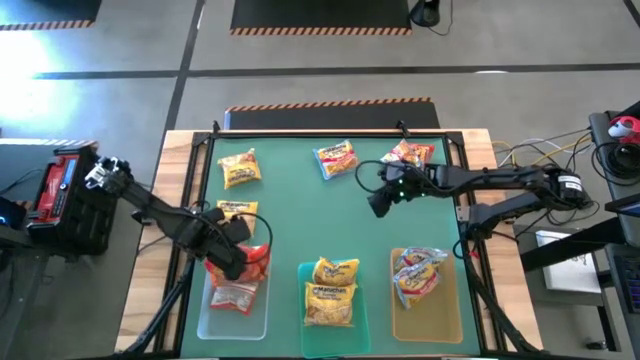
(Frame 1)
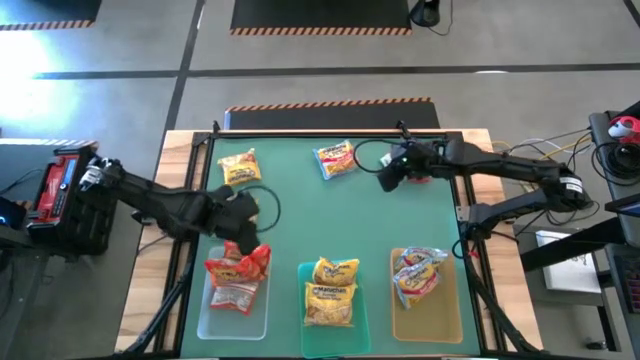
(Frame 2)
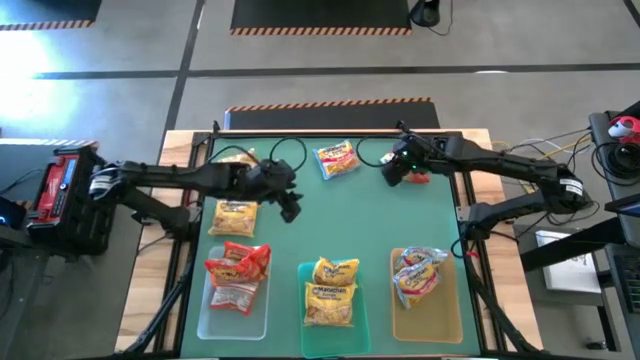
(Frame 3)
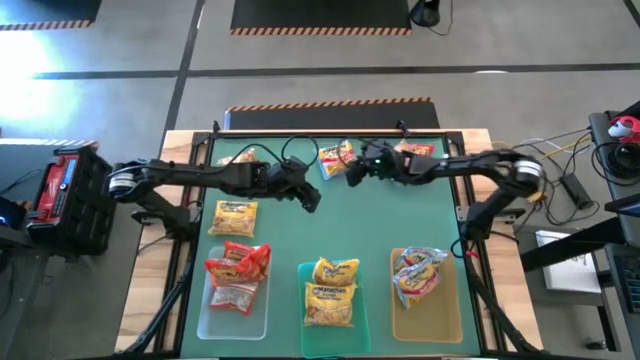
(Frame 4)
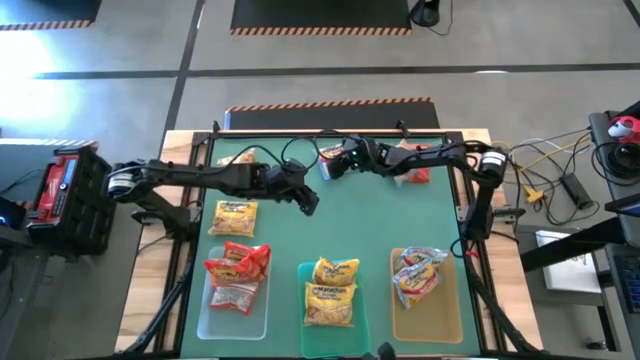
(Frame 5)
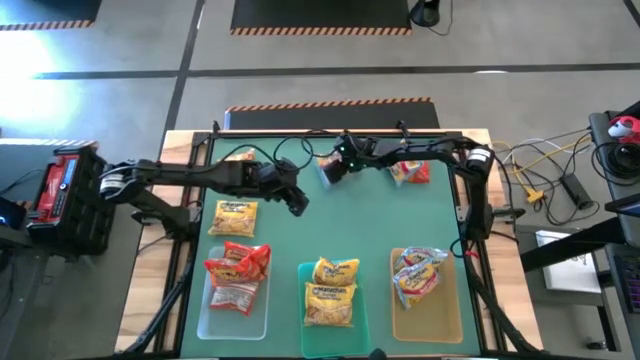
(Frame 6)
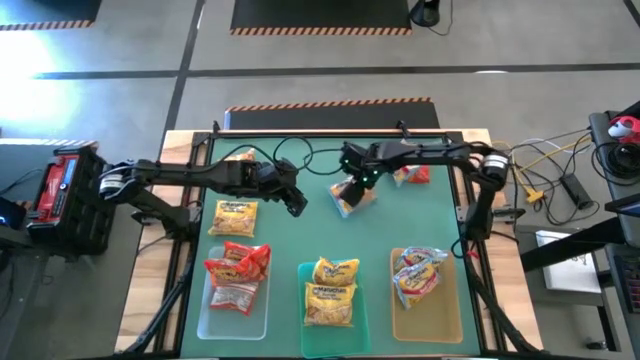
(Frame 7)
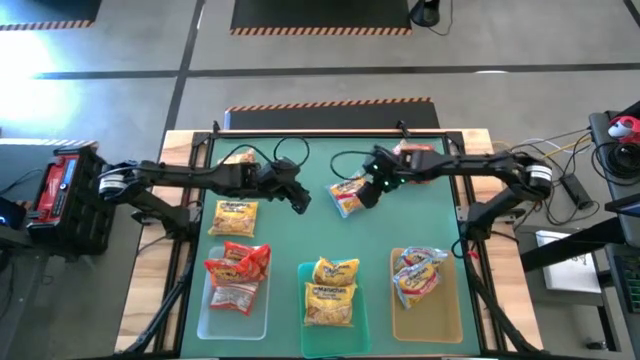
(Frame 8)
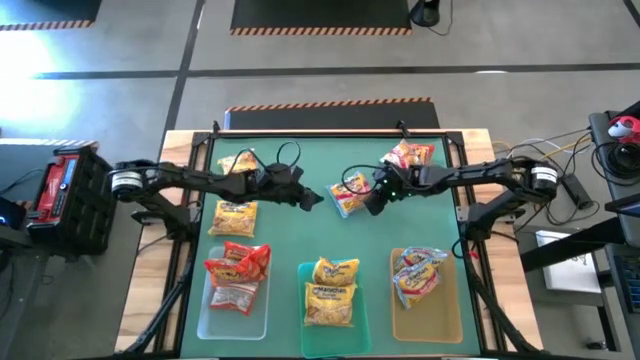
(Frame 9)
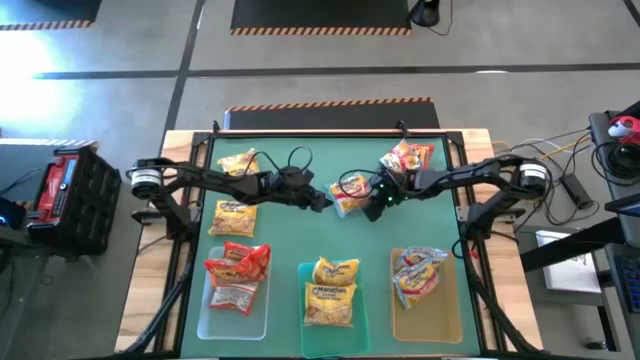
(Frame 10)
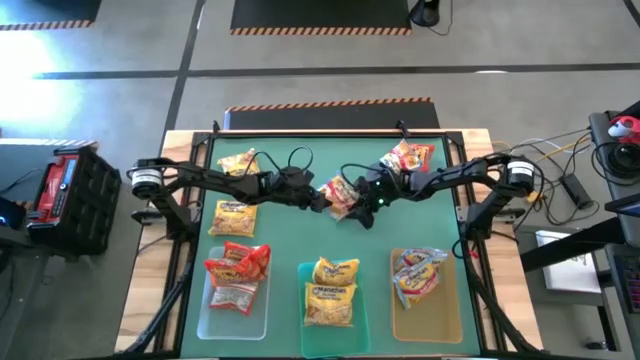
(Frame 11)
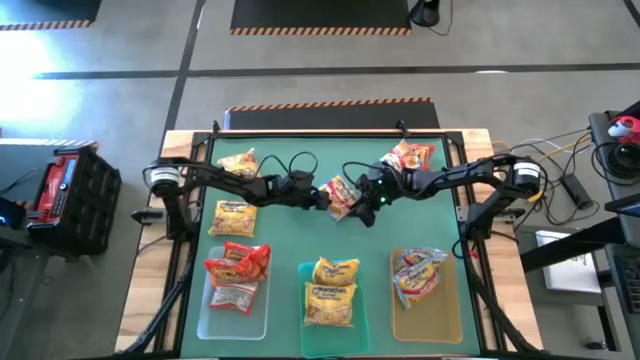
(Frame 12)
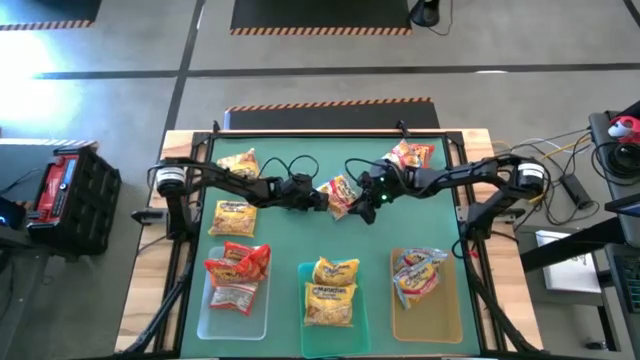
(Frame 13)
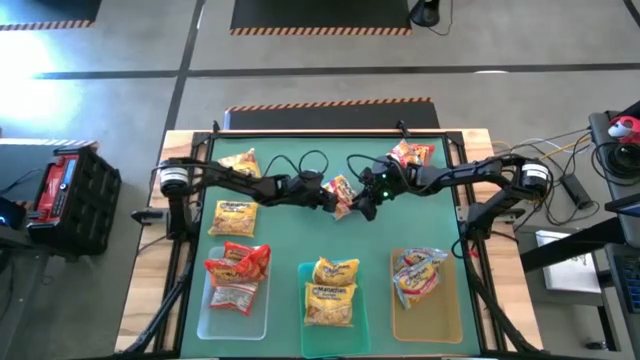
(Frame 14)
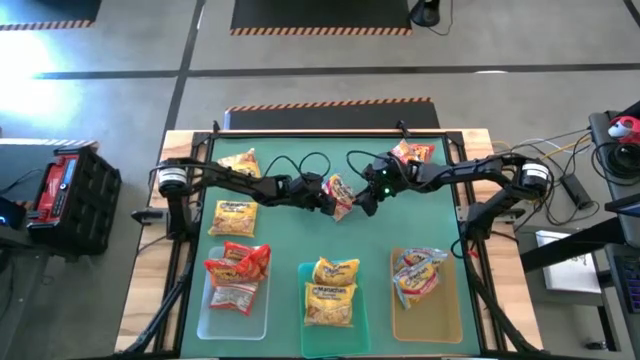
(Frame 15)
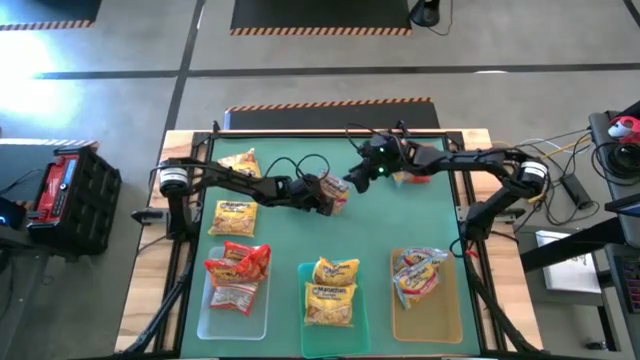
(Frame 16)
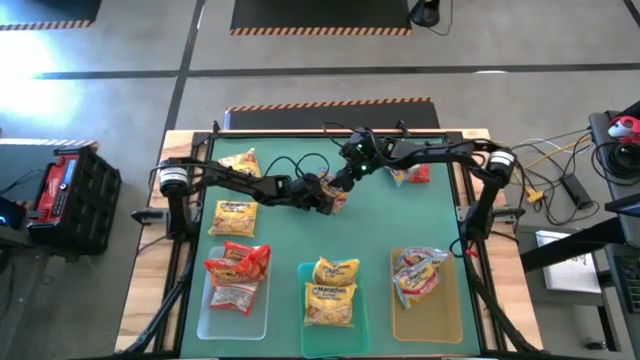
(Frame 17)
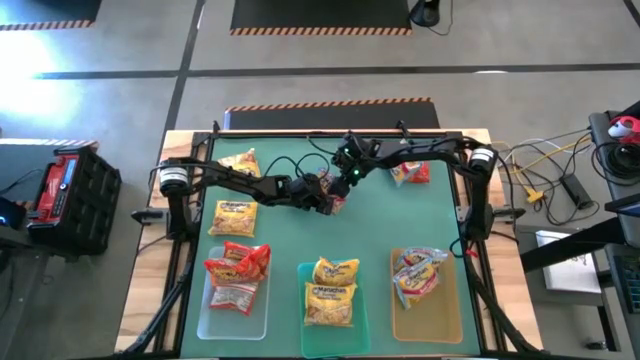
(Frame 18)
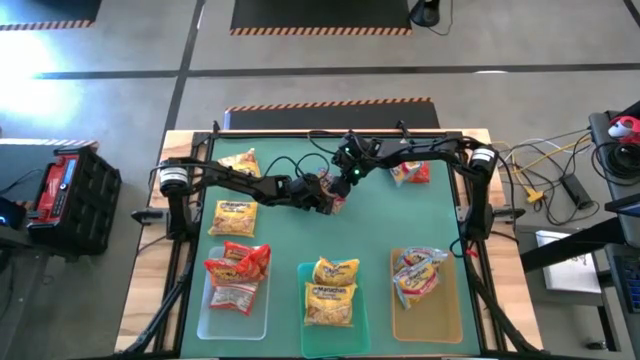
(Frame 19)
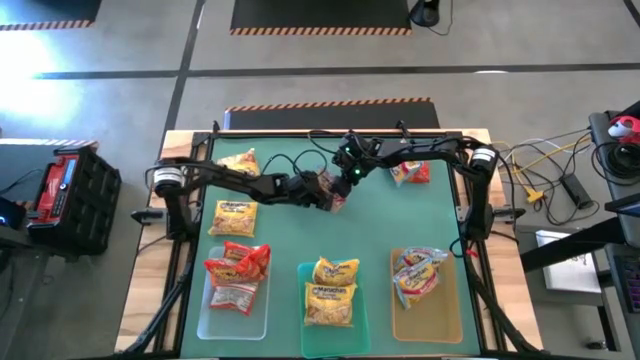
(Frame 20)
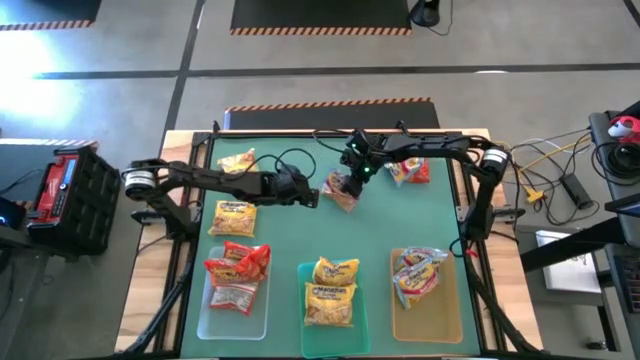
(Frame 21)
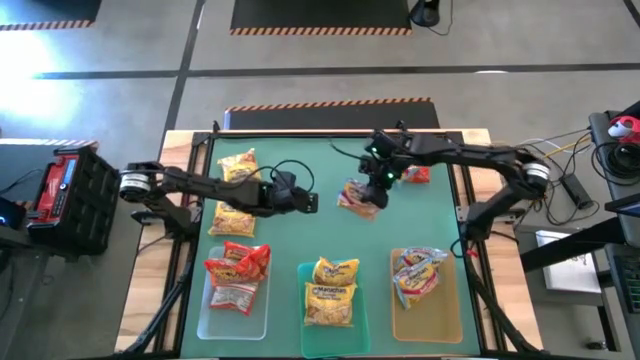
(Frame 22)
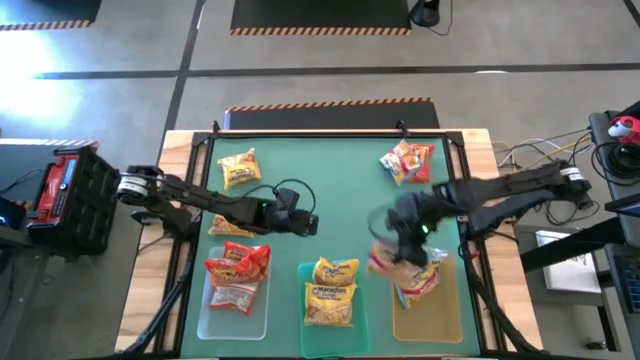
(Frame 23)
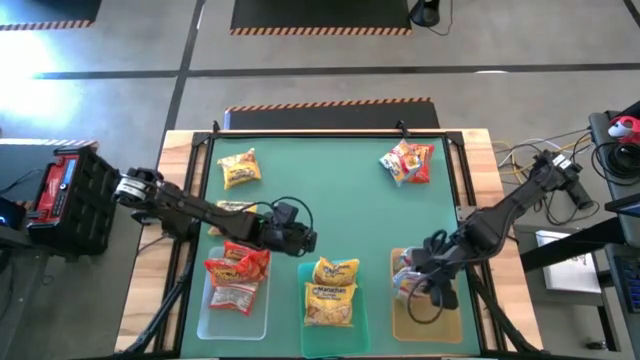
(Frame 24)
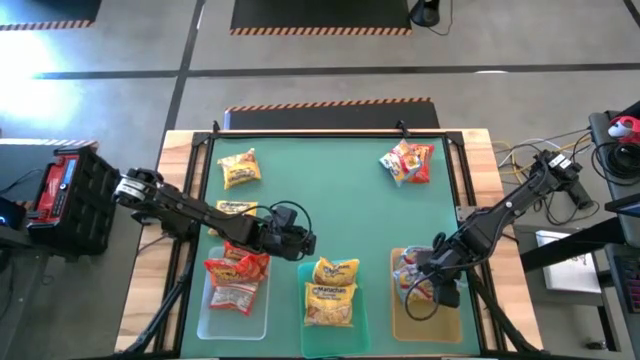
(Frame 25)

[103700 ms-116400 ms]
Task: Sort Maruchan noodles
Put the blue noodle pack into the yellow bin

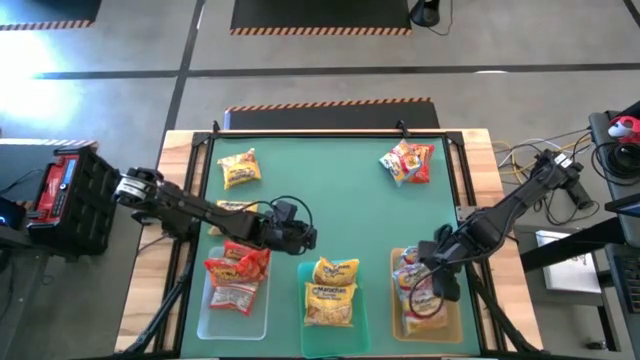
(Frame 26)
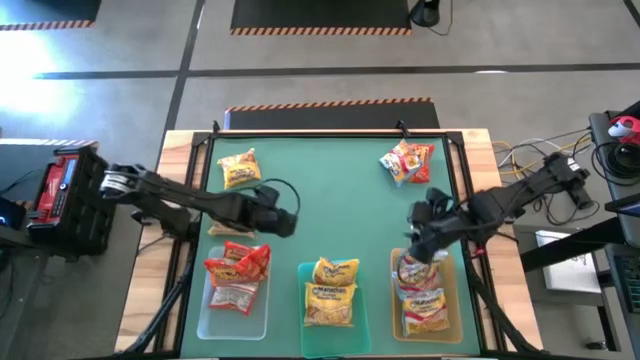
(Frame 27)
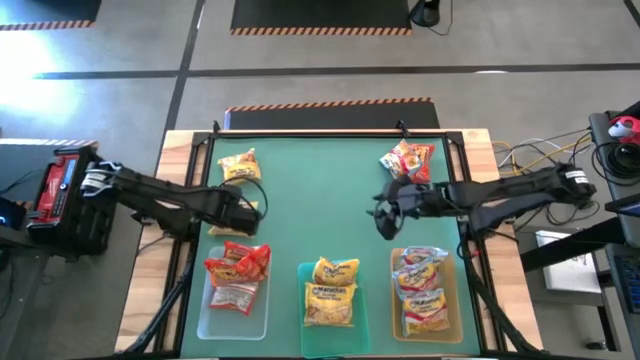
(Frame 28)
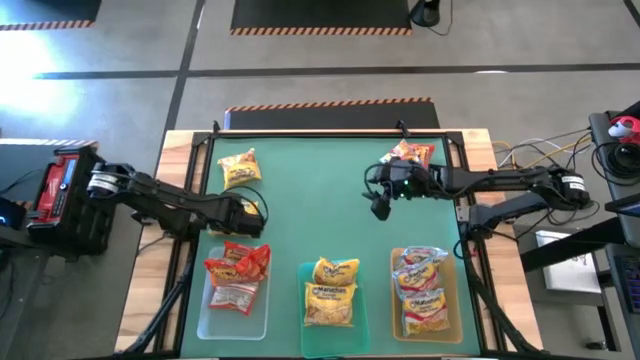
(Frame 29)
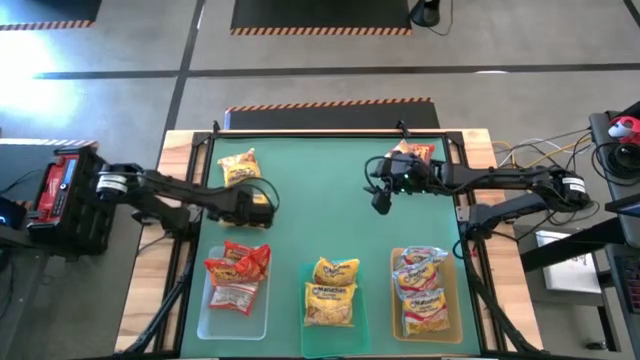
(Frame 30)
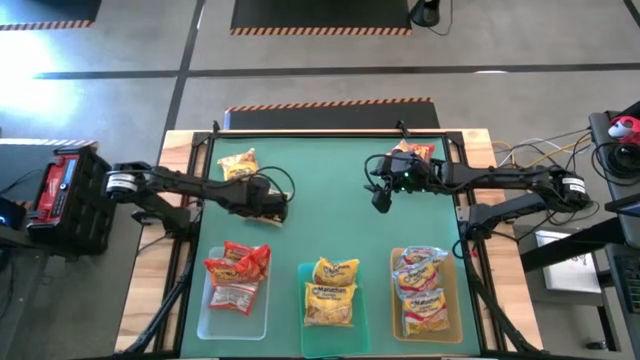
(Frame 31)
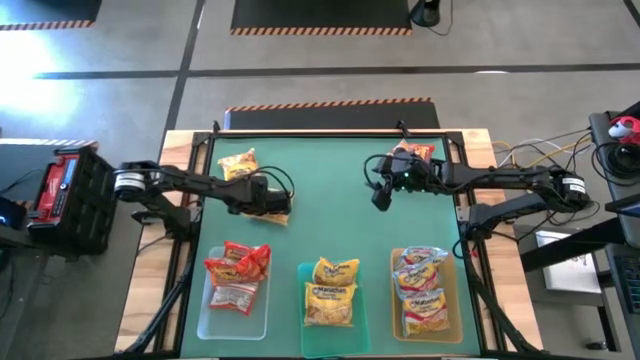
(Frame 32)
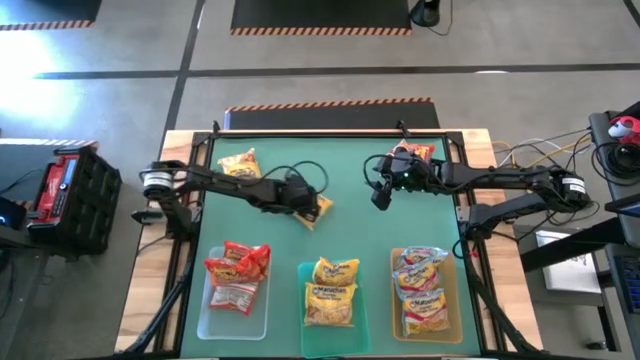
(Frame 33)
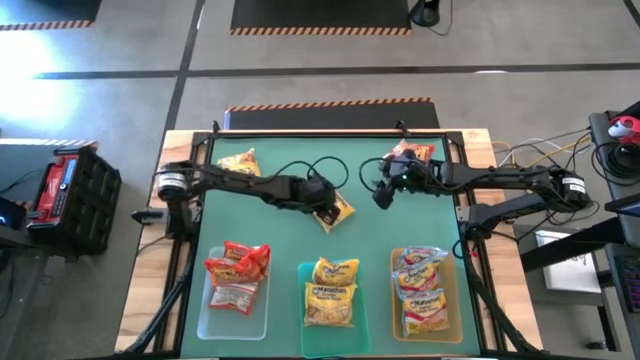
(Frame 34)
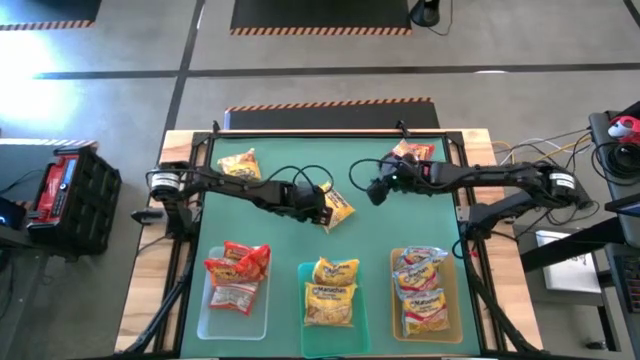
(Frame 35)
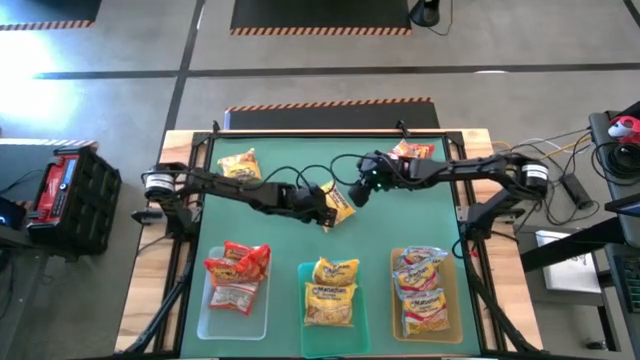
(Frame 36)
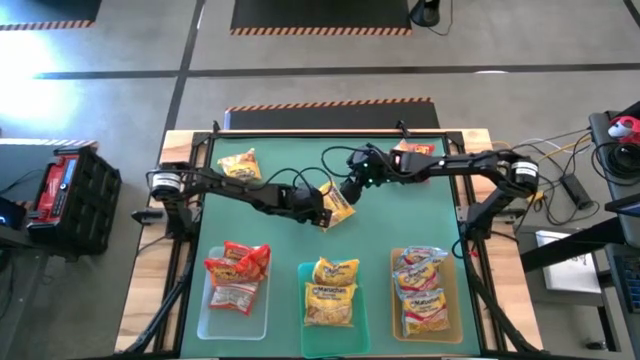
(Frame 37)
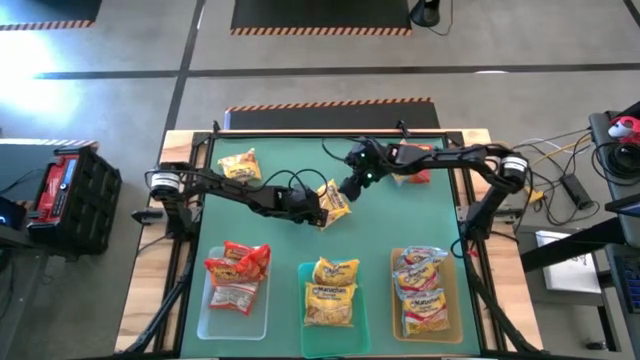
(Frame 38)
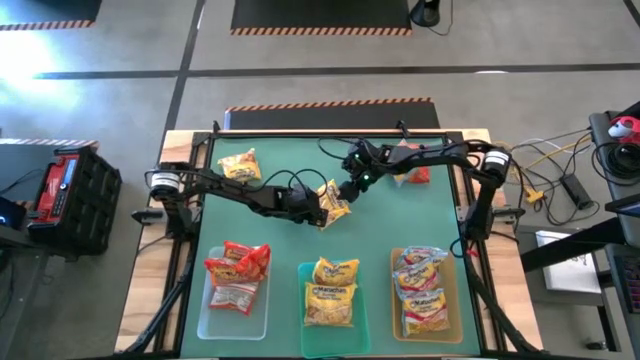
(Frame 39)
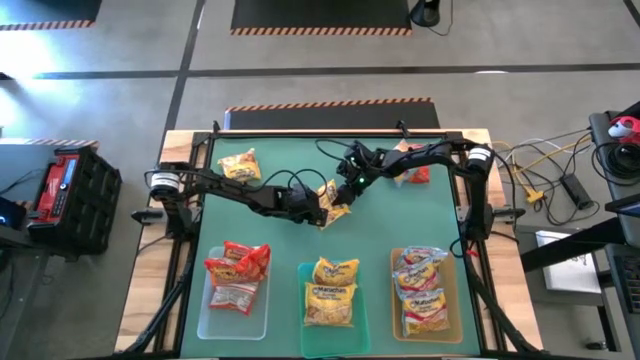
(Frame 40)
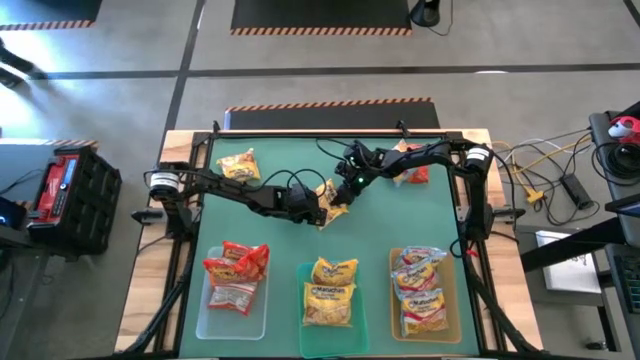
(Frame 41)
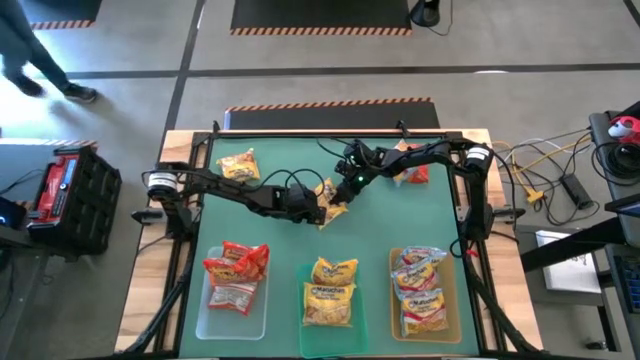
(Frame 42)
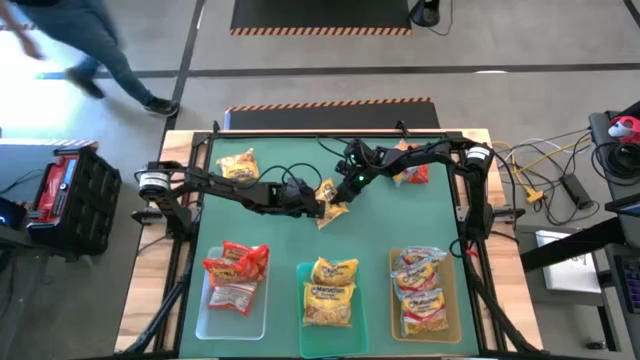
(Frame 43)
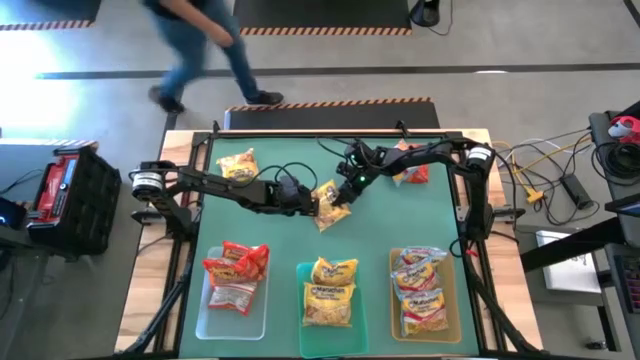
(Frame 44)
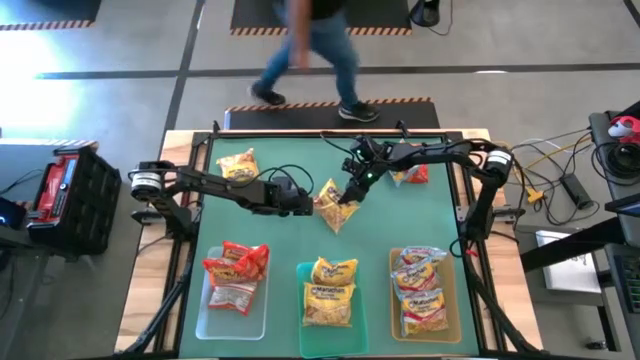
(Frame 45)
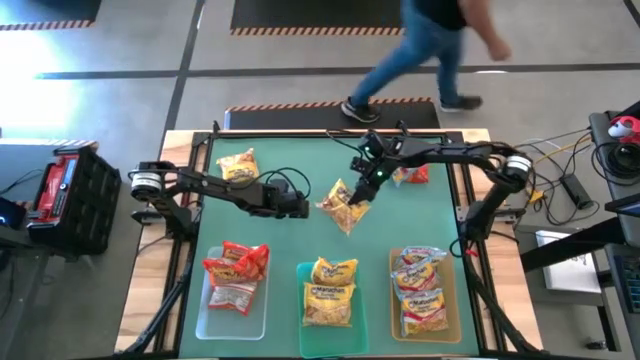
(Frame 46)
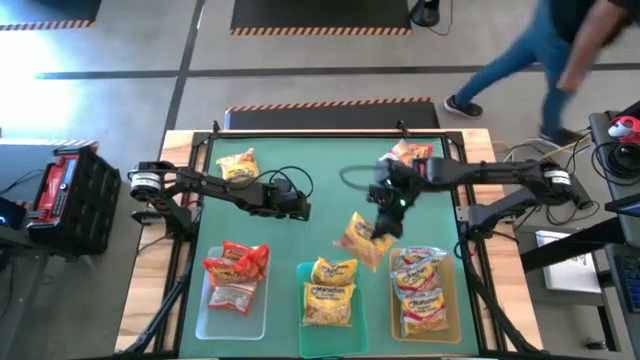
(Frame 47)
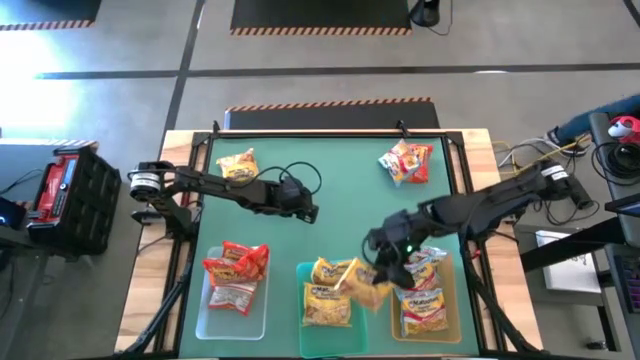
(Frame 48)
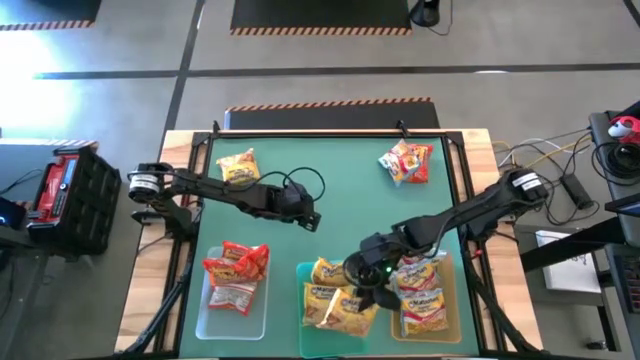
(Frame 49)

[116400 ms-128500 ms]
Put the yellow noodle pack into green bin
